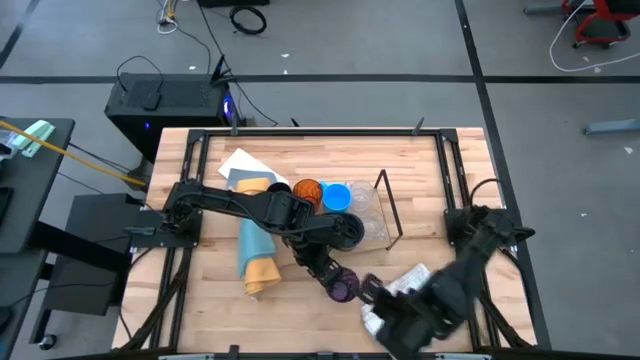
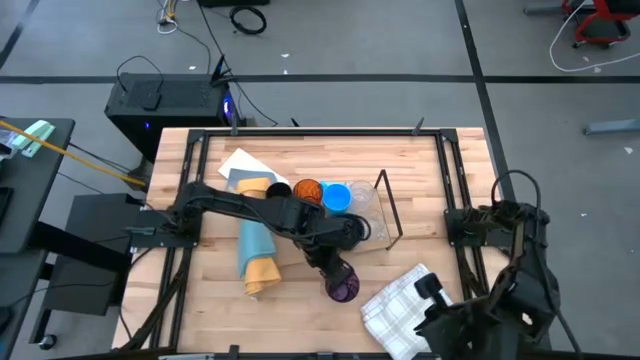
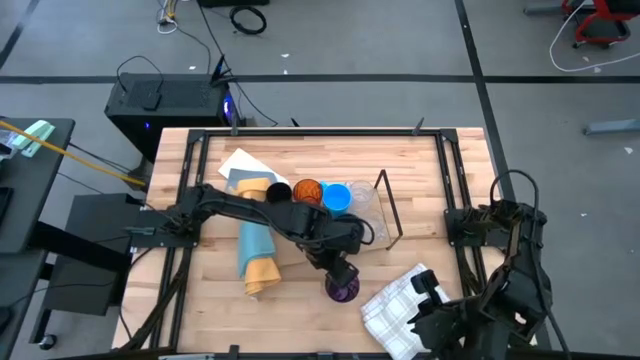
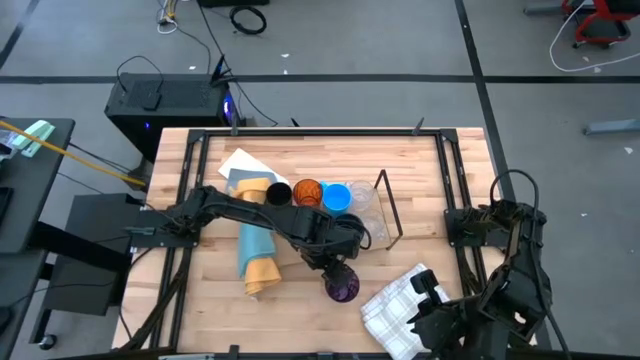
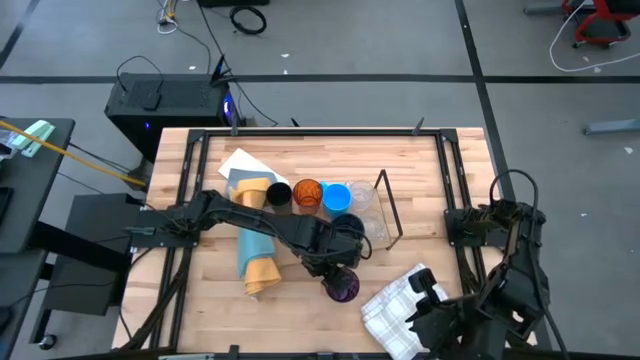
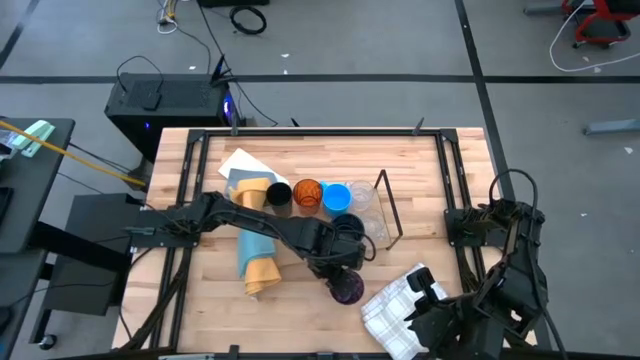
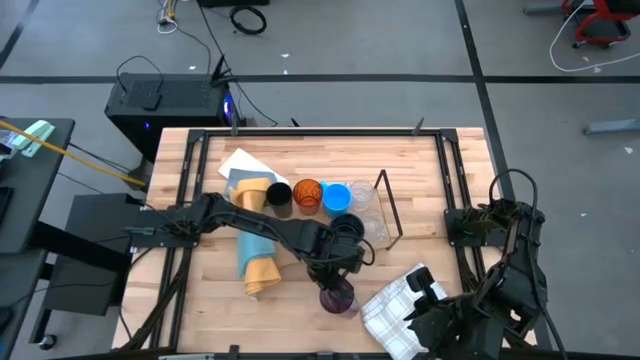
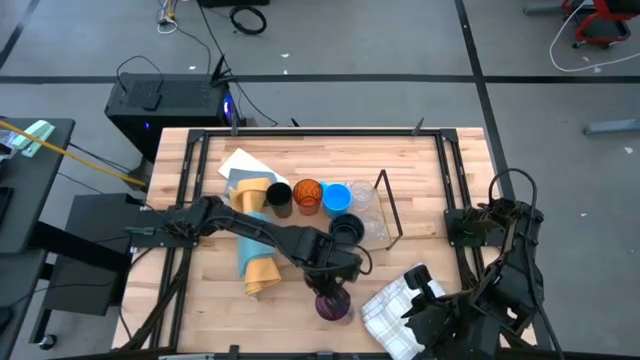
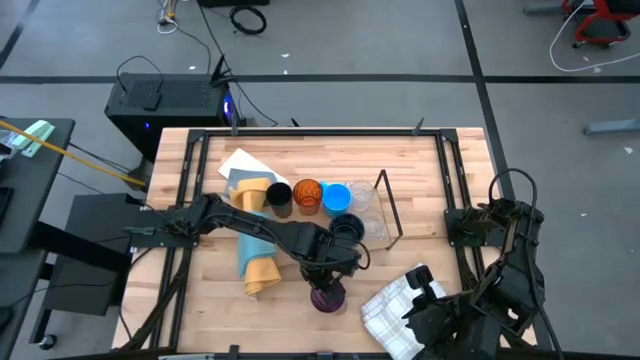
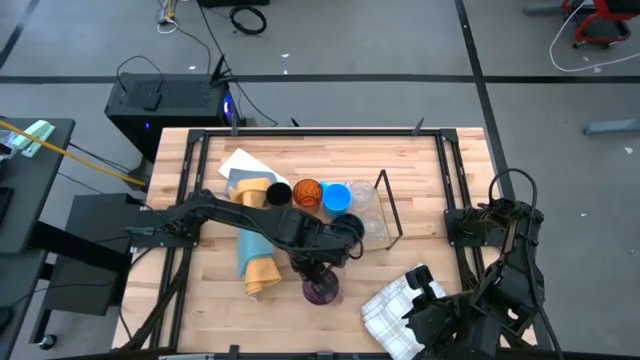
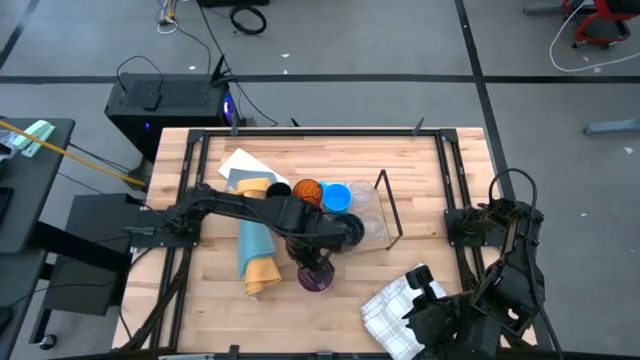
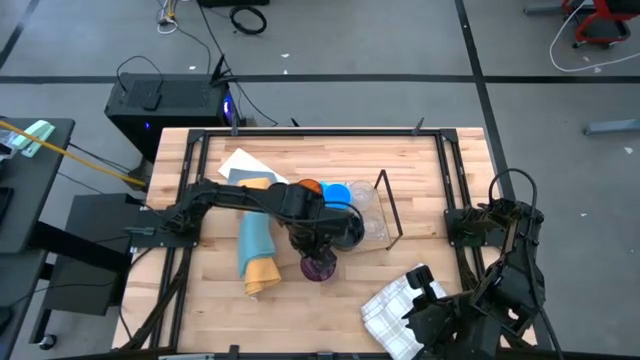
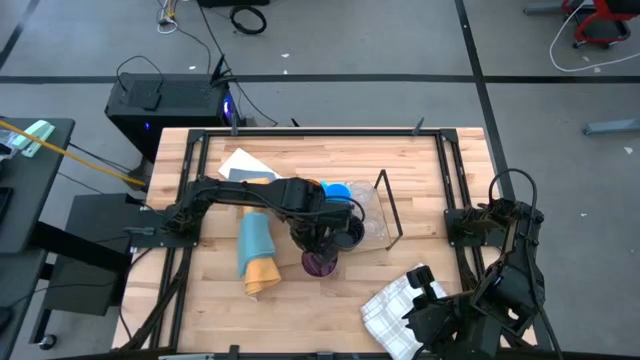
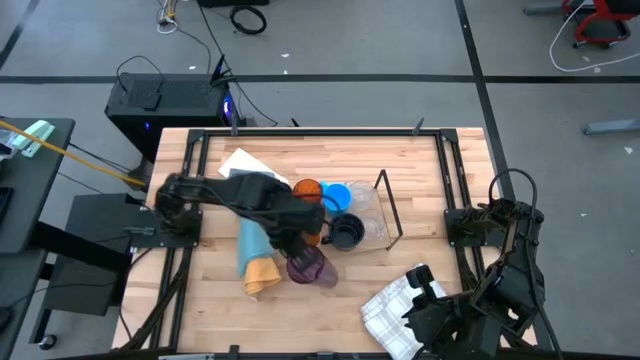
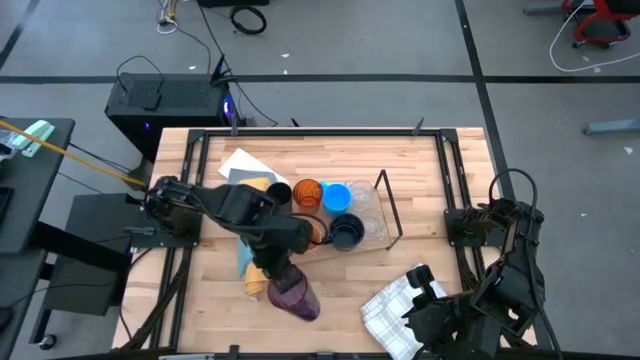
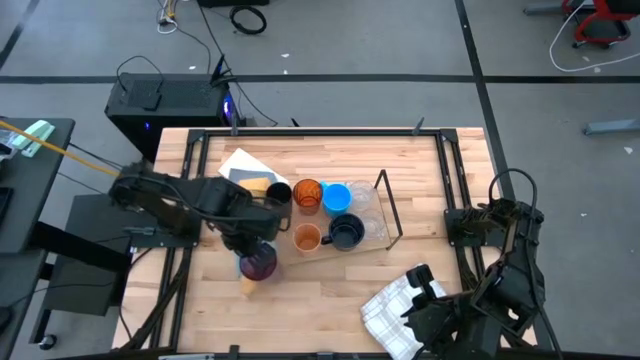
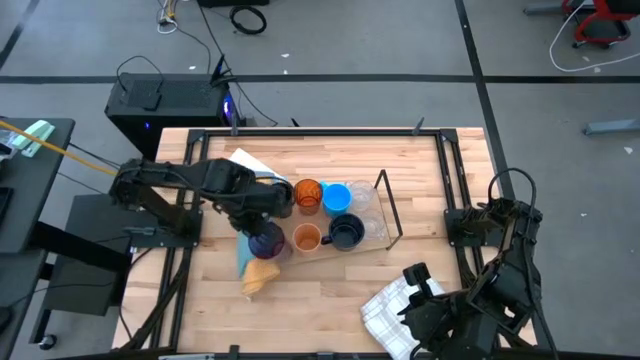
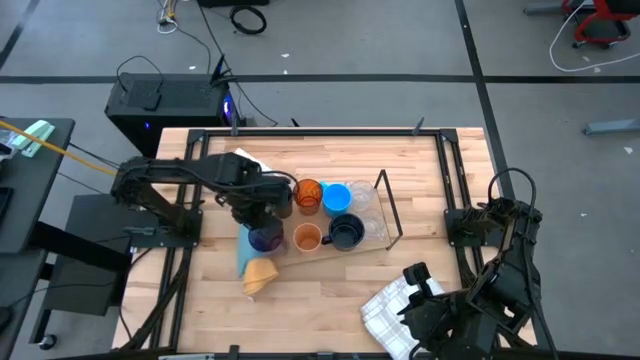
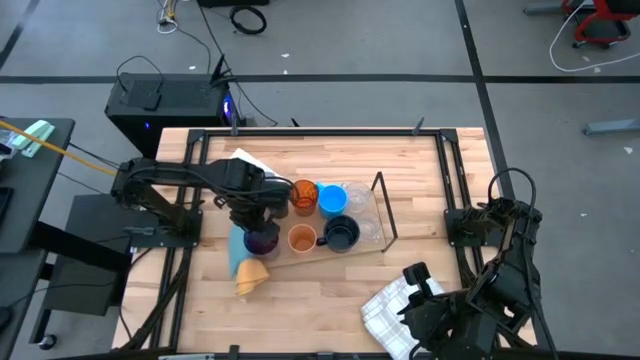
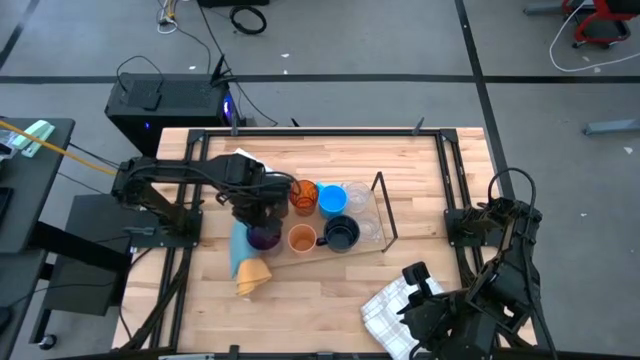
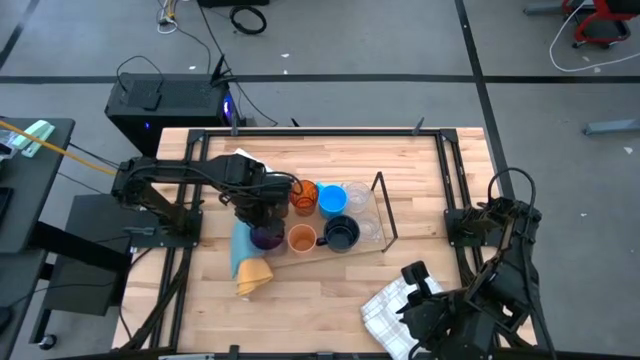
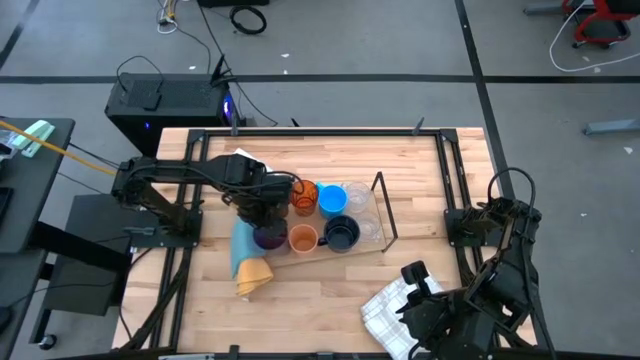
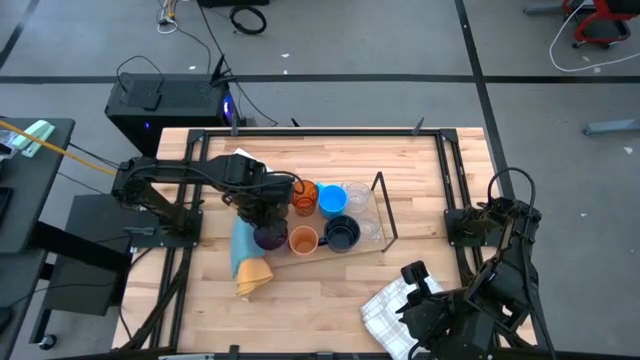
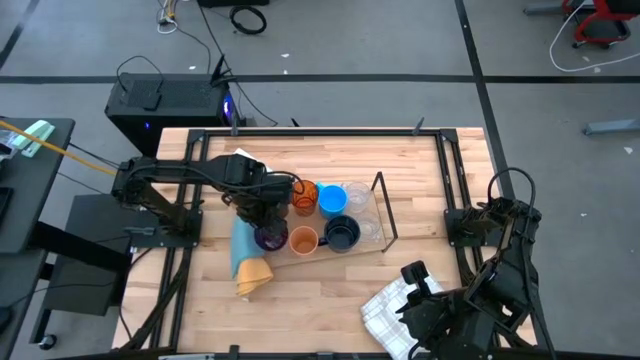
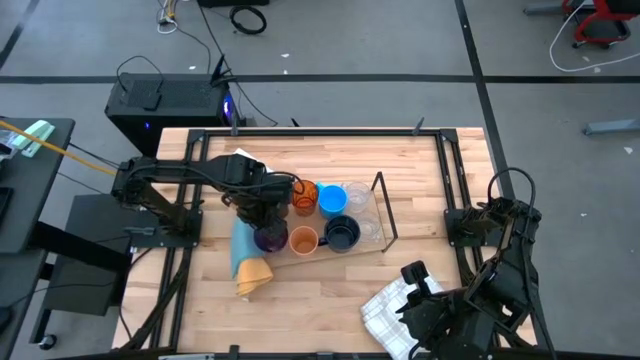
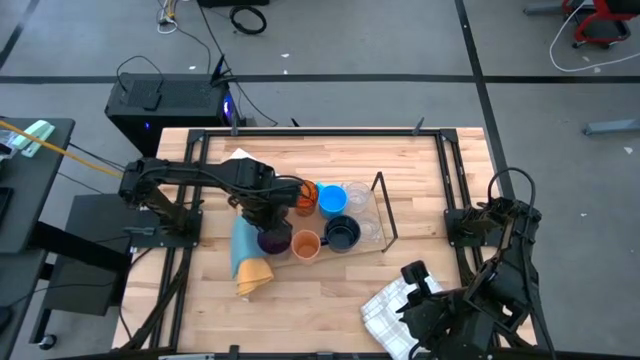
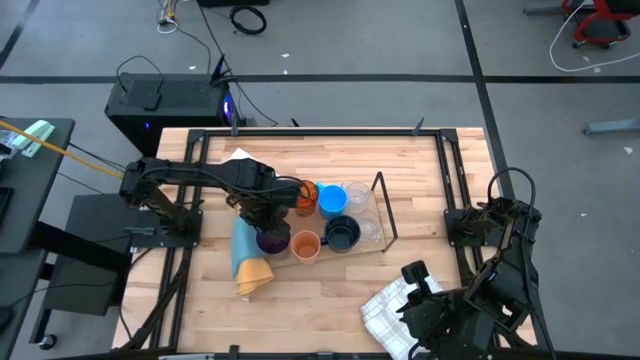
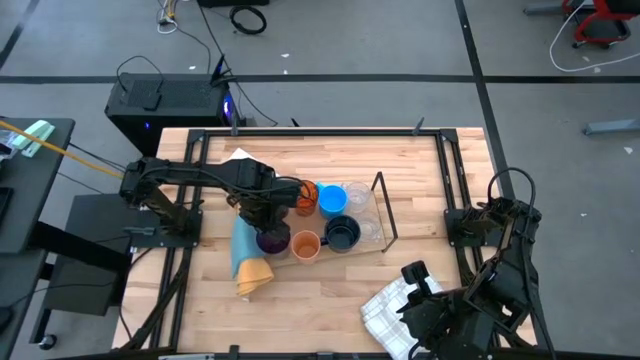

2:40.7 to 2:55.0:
Task: Stack small to large cups/mugs on shelf
Put the purple cup on the shelf

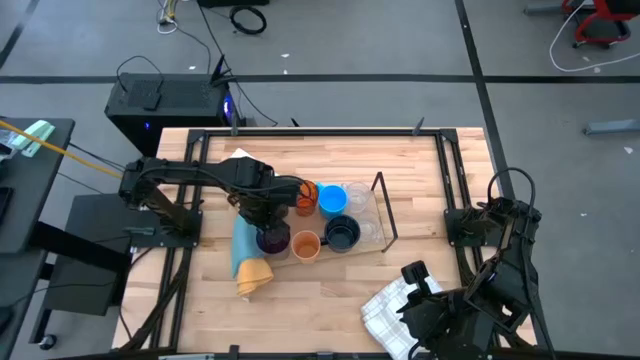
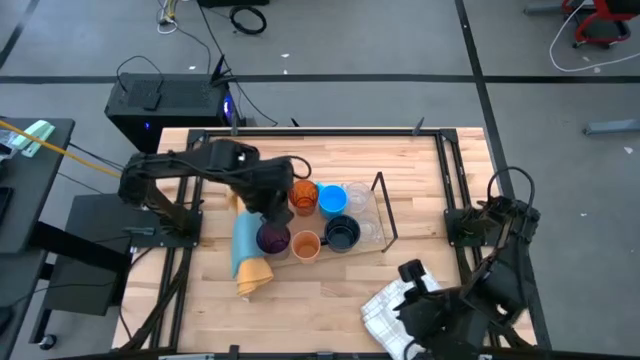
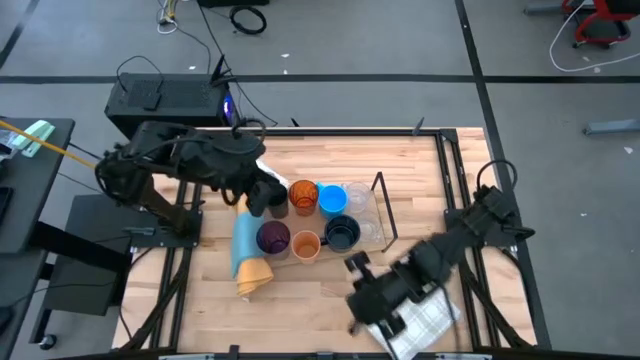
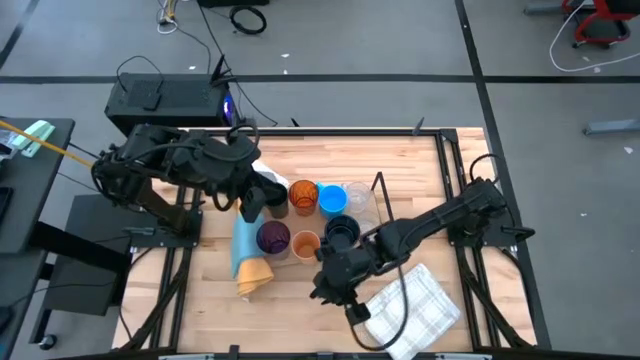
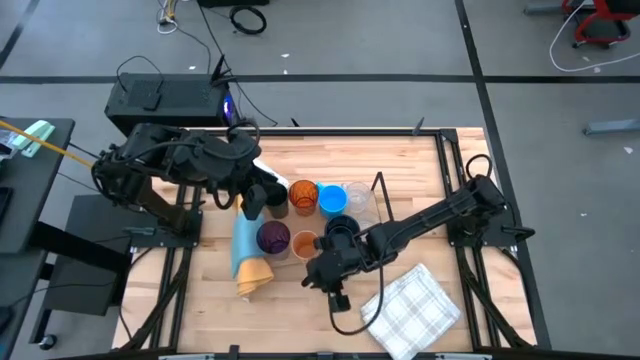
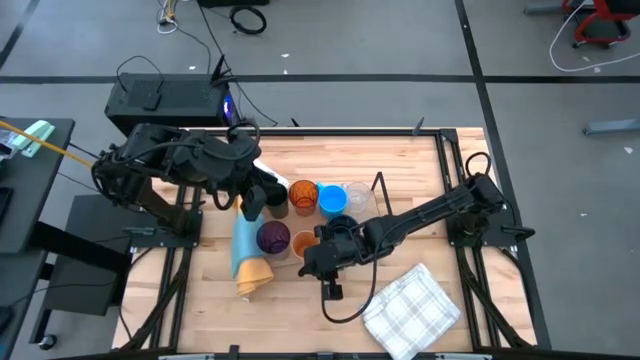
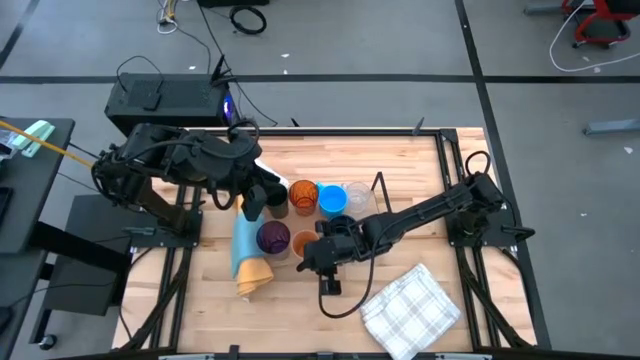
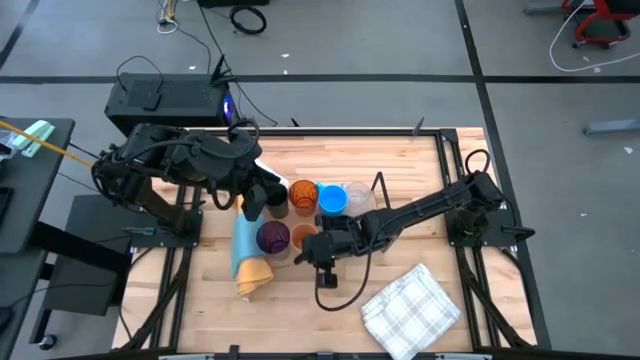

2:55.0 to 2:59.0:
Adjust the light orange cup on the shelf

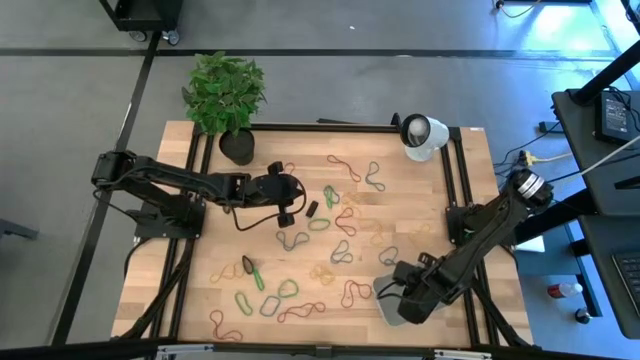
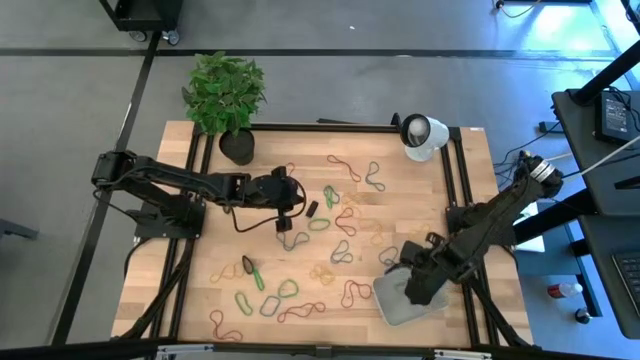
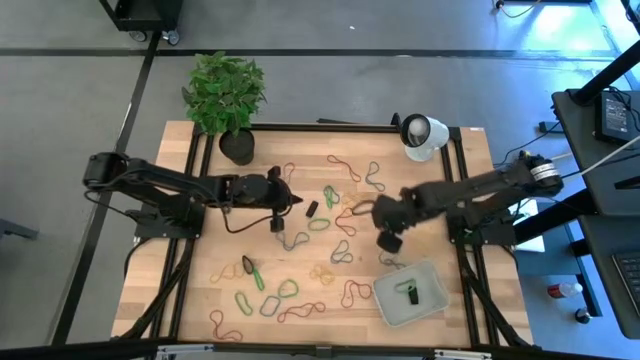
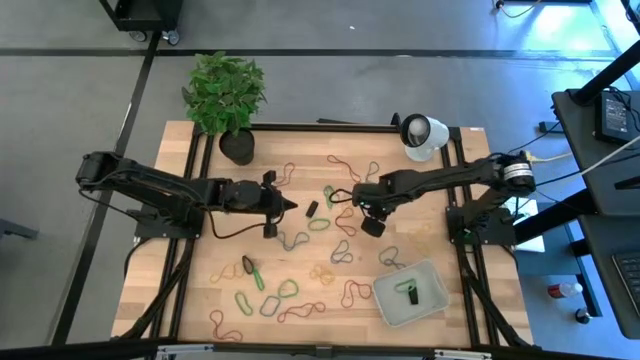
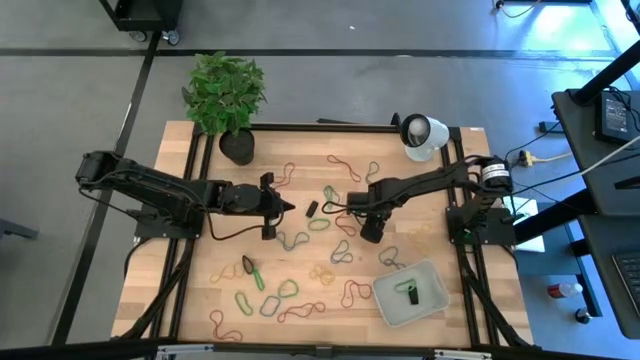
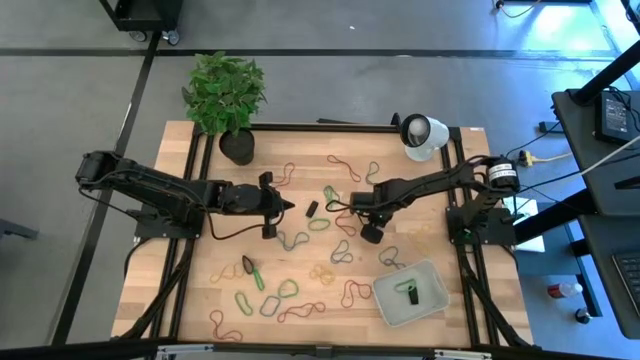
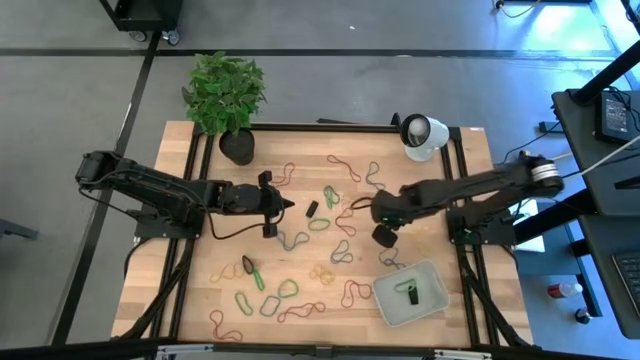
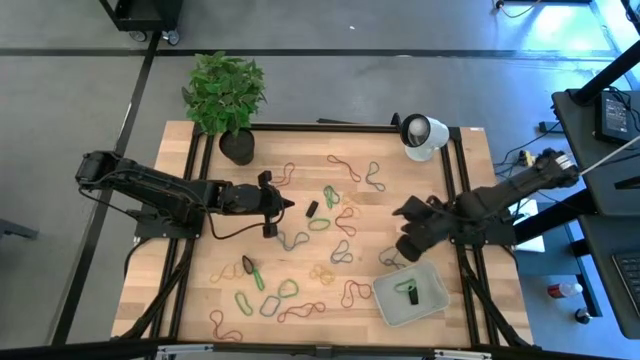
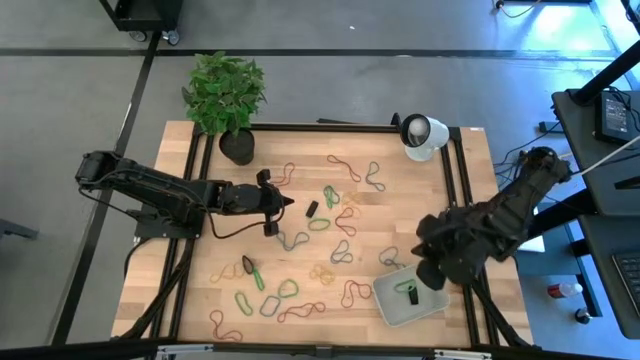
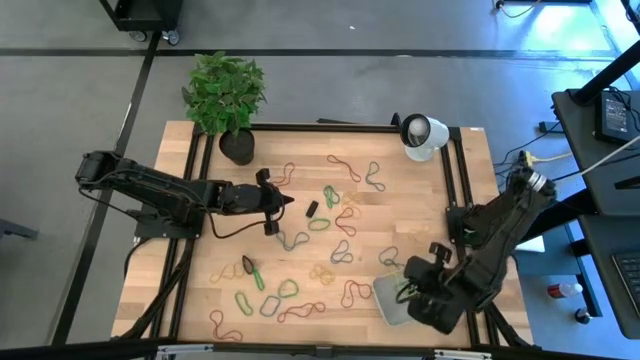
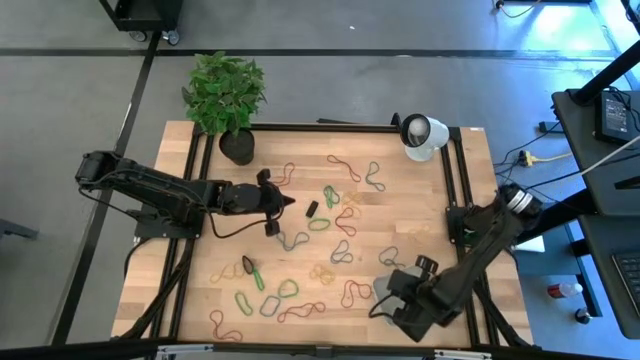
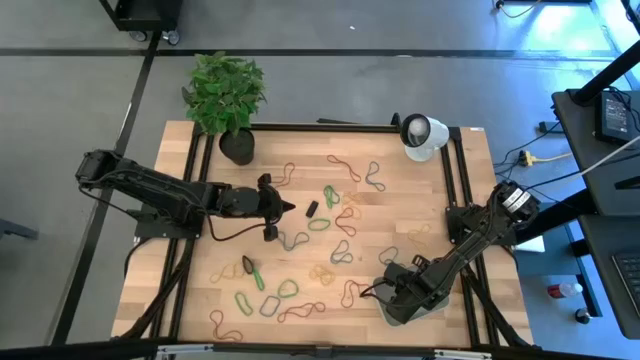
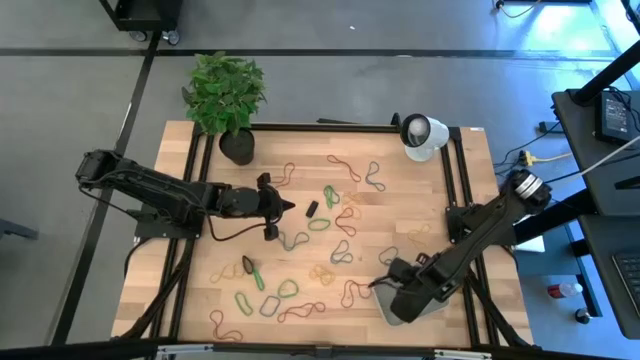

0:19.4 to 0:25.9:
Task: Pick and place rubber bands into bin
Put the yellow rubber band into the white bin
